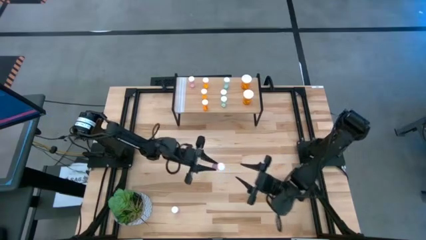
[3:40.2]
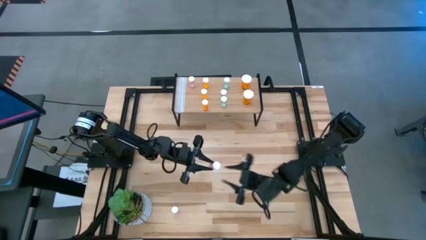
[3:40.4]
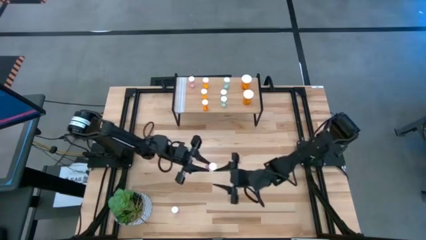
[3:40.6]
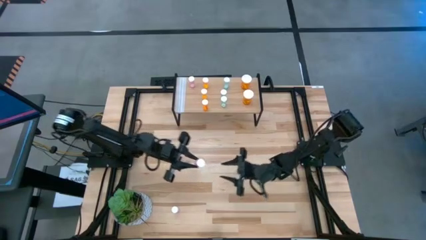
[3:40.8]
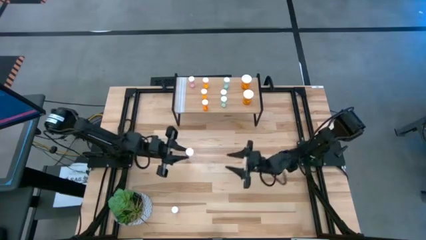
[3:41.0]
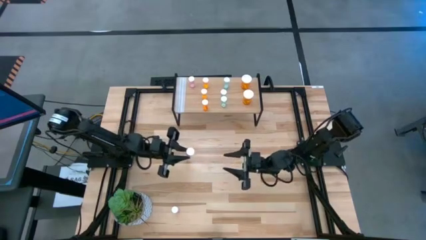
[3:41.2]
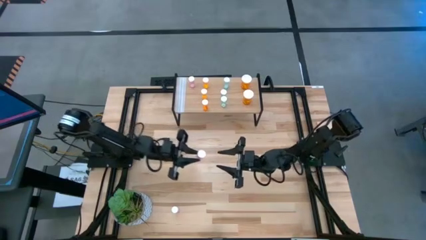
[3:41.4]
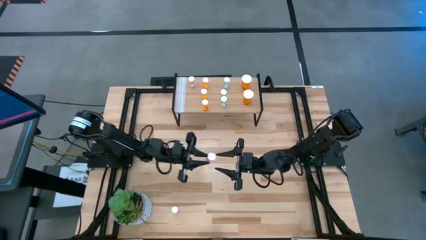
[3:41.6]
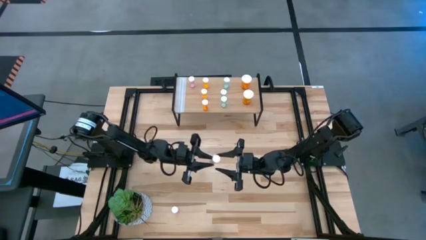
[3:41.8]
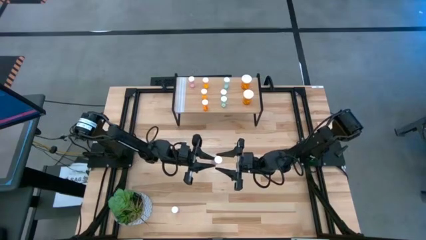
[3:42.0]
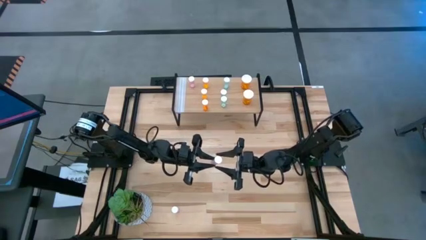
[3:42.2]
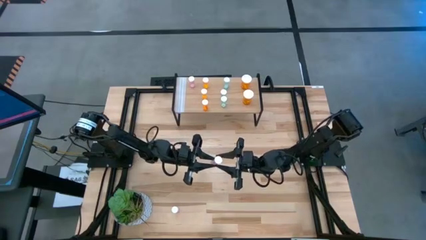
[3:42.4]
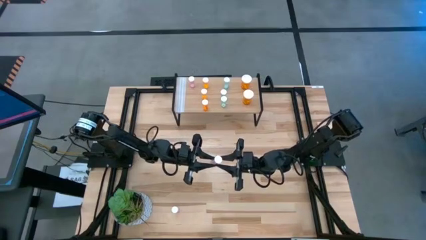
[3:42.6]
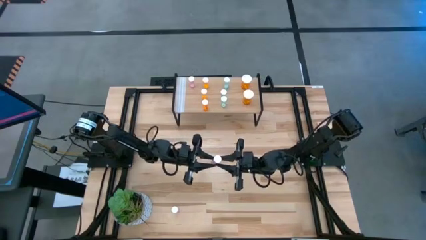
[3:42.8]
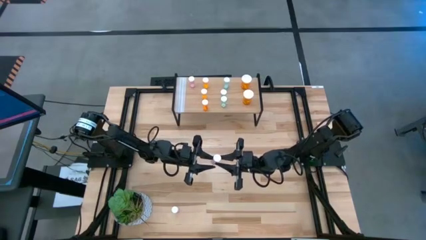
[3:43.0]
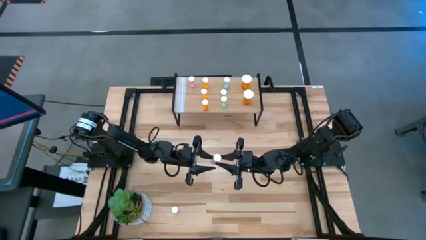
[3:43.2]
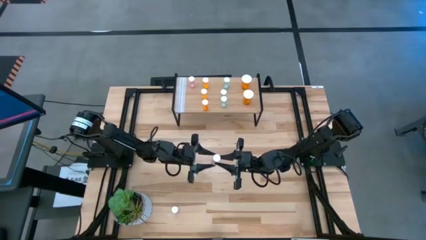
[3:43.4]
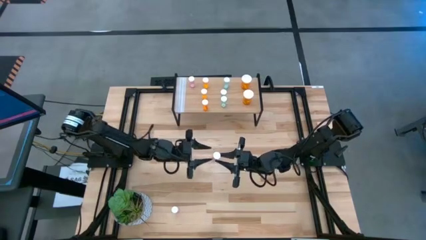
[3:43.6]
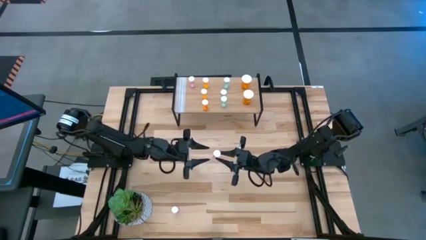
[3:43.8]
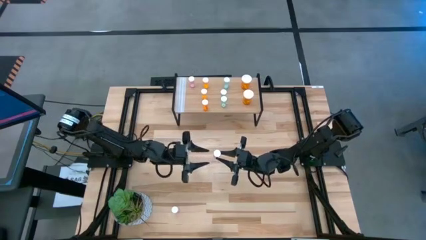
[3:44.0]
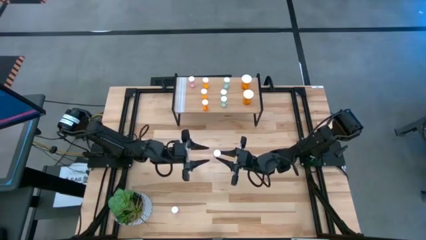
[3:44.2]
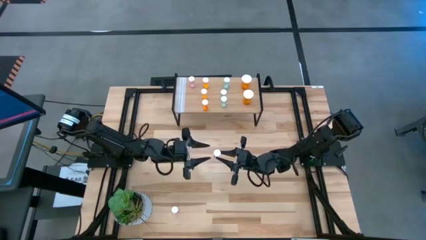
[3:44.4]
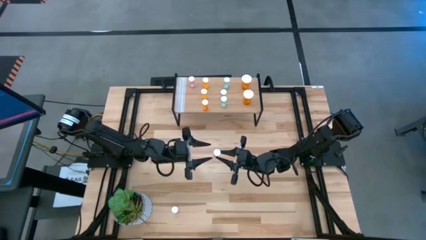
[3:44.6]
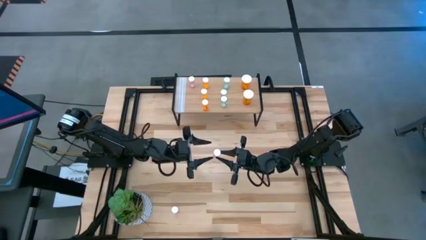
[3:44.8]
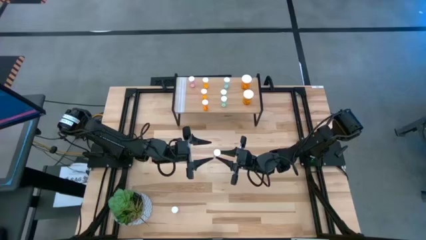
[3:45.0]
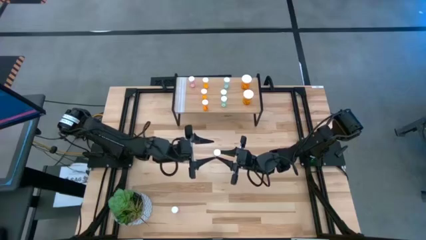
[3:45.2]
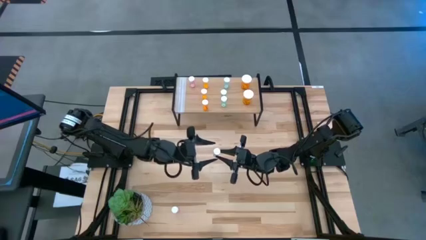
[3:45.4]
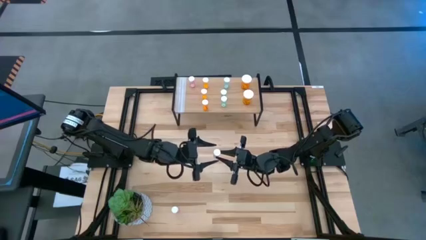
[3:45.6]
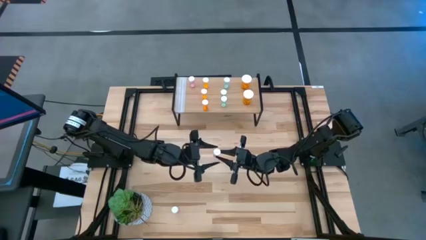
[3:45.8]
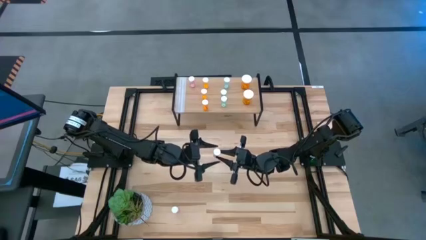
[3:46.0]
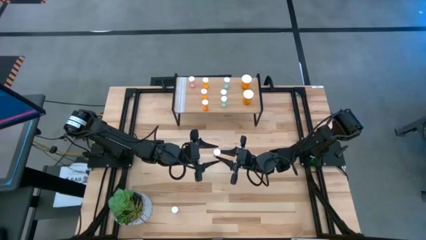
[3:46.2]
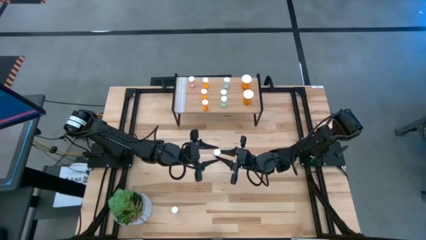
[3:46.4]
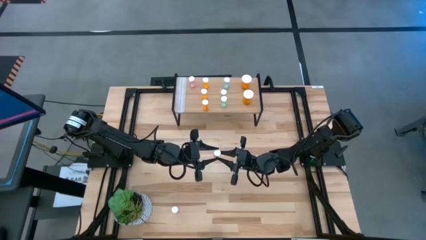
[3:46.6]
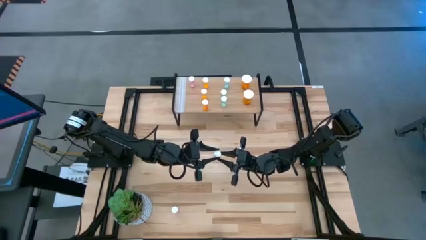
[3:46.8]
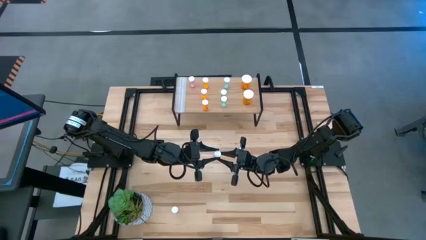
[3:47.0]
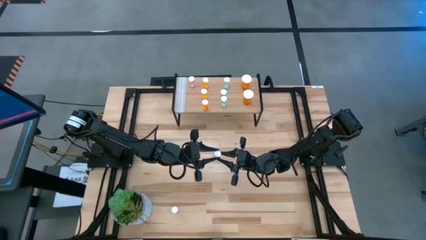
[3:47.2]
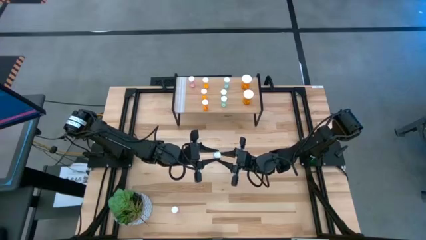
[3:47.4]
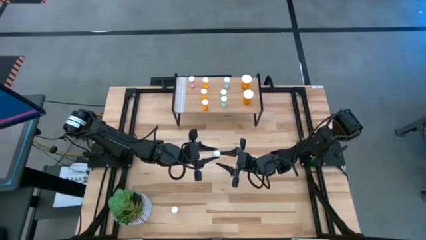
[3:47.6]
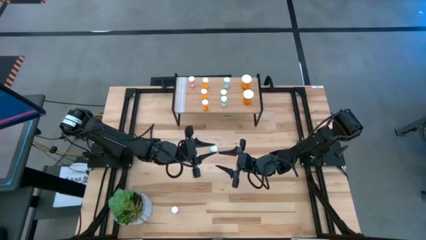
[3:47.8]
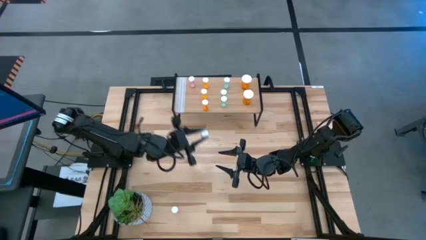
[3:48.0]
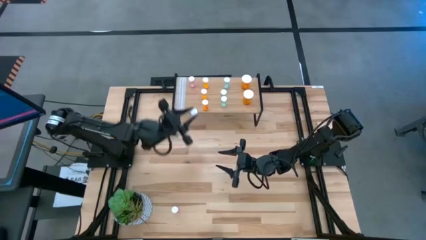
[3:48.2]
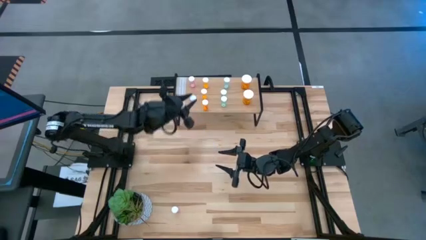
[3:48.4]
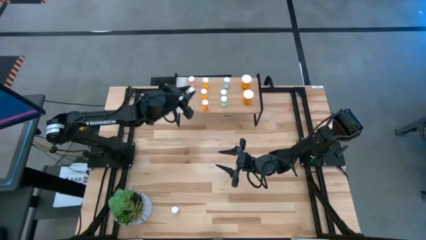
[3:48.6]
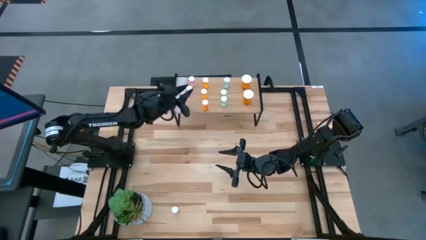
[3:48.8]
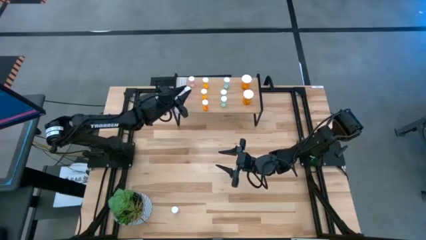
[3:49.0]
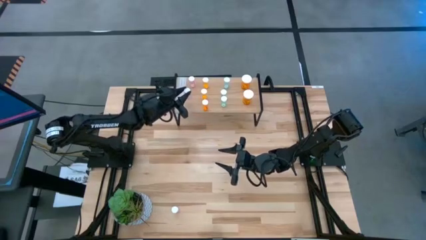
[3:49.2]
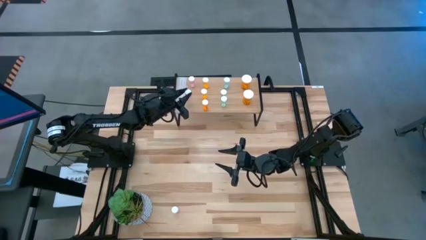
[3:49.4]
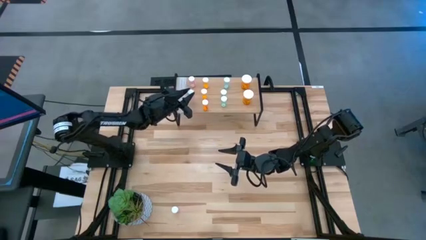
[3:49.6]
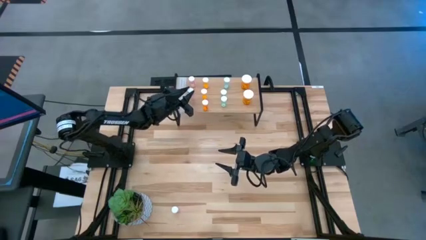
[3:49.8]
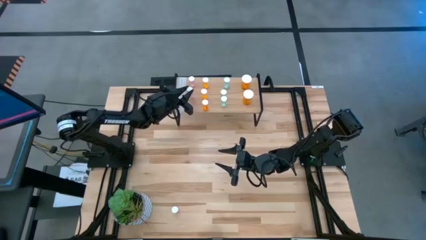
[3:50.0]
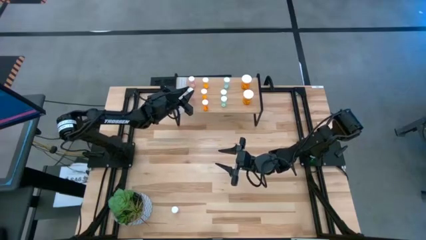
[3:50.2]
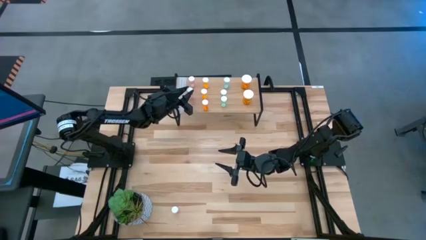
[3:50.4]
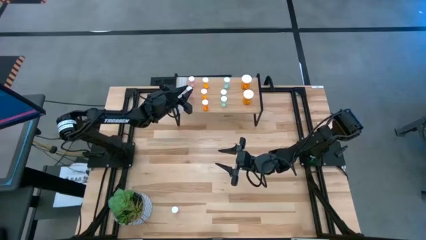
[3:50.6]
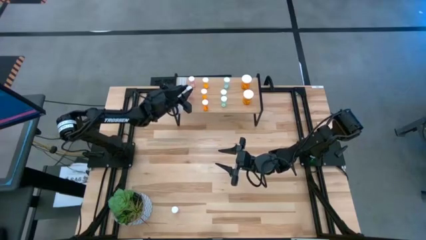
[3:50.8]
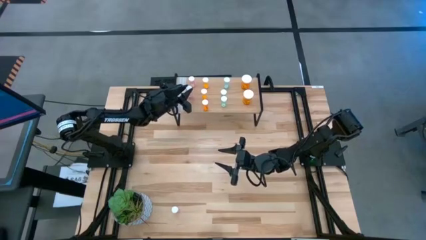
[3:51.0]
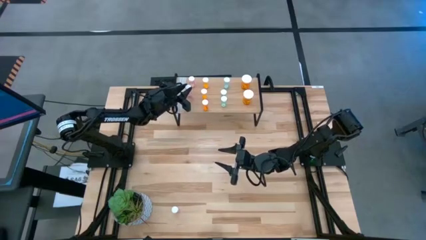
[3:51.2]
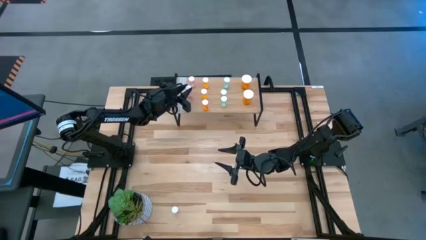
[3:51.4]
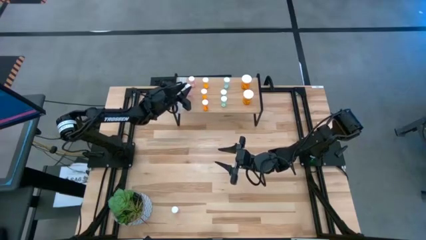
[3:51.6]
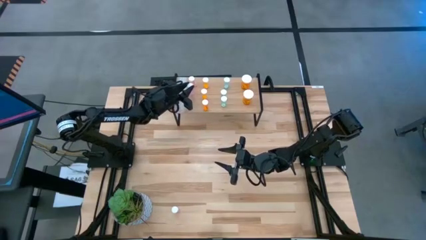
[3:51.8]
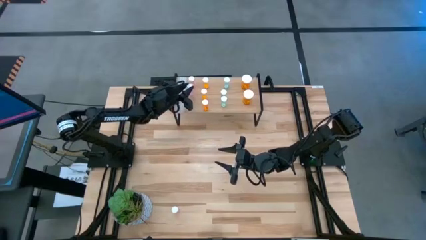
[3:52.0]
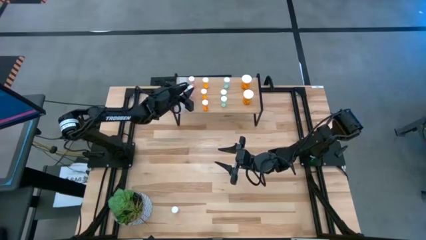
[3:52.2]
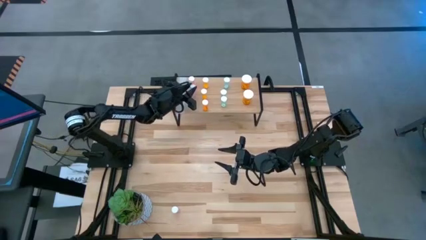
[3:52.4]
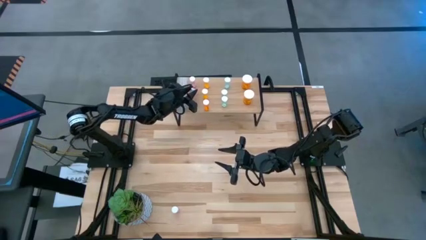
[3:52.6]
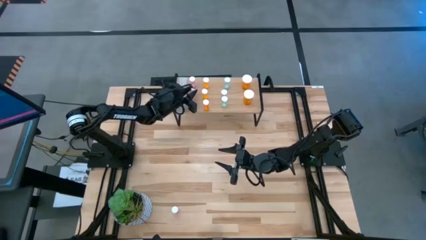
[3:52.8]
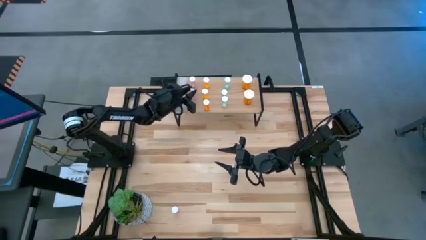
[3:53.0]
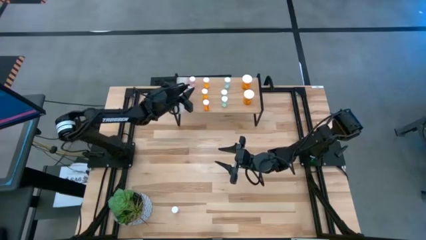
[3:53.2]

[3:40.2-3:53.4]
Task: Pick and place medicine bottles onto shelf by color
Put the top small pink pill bottle on the shelf aligned with the other small pink pill bottle

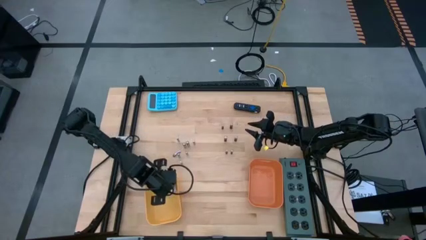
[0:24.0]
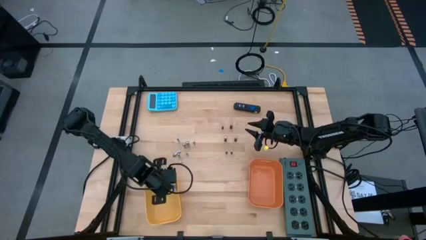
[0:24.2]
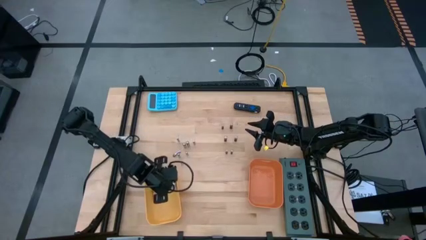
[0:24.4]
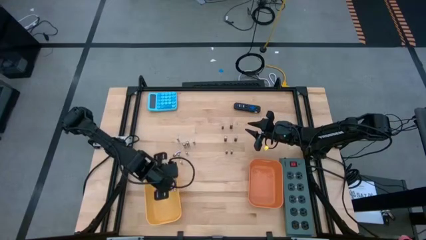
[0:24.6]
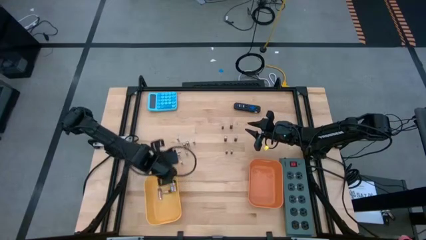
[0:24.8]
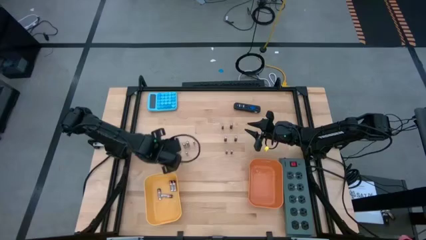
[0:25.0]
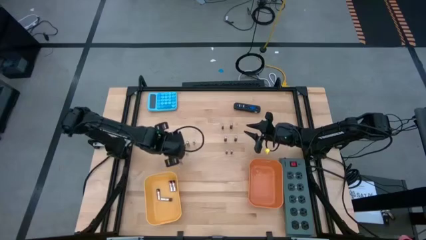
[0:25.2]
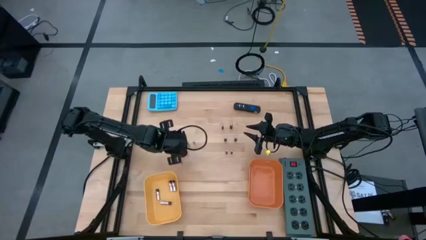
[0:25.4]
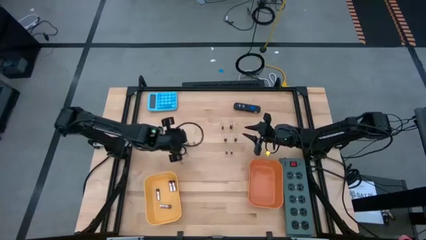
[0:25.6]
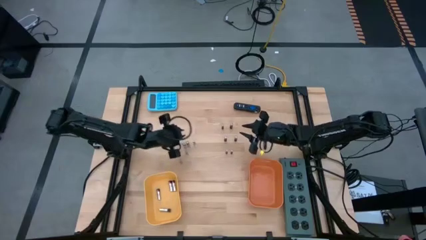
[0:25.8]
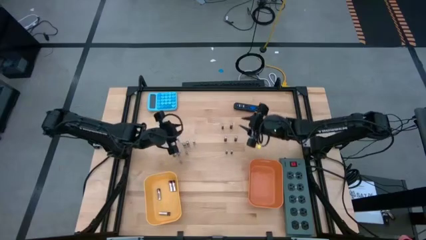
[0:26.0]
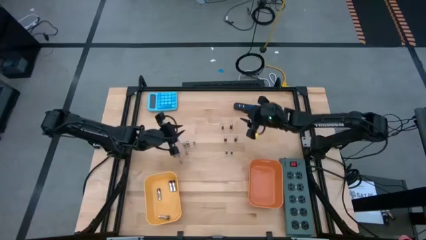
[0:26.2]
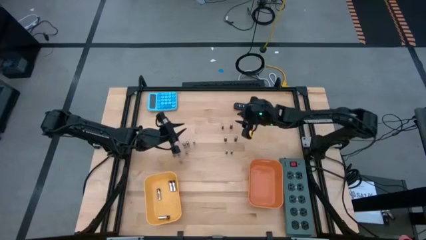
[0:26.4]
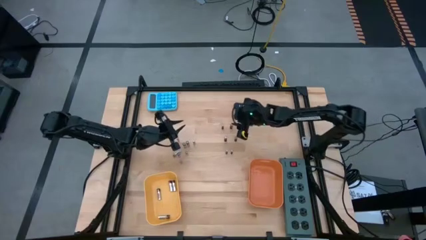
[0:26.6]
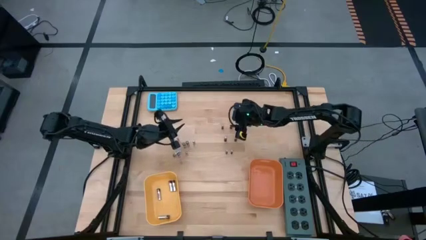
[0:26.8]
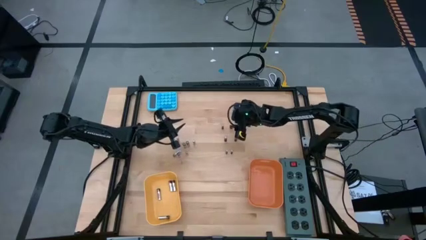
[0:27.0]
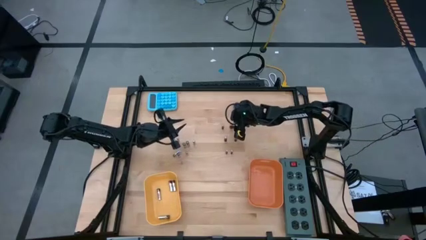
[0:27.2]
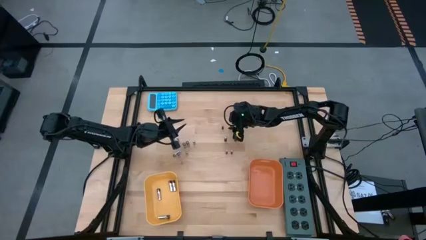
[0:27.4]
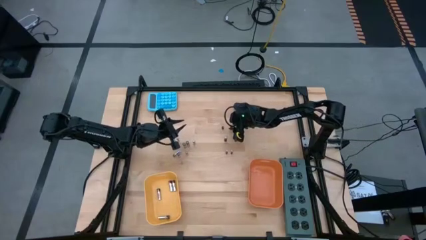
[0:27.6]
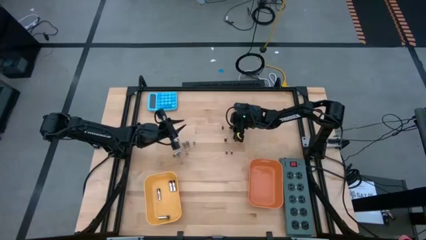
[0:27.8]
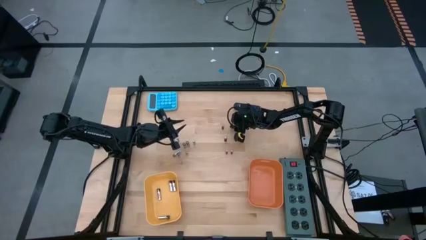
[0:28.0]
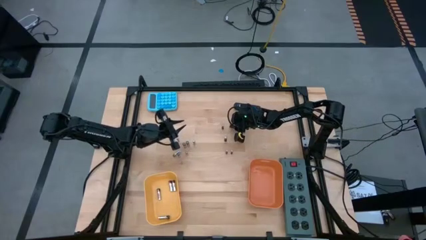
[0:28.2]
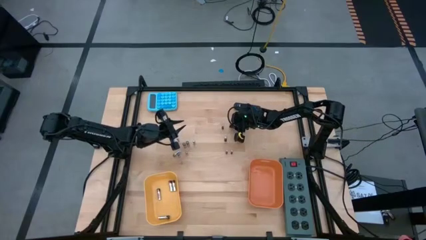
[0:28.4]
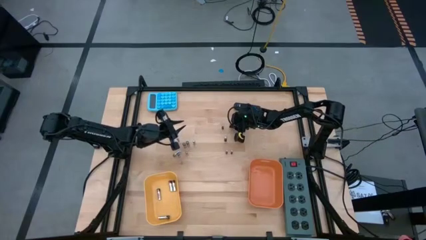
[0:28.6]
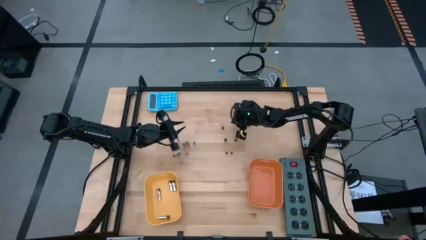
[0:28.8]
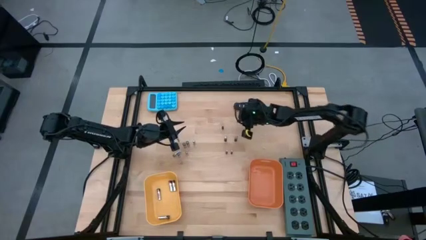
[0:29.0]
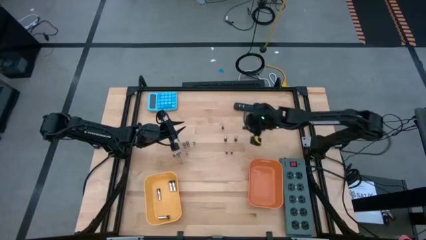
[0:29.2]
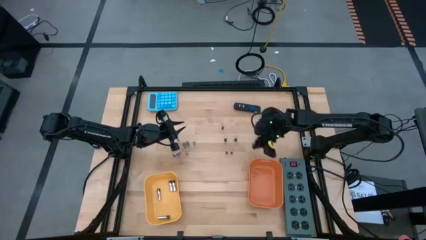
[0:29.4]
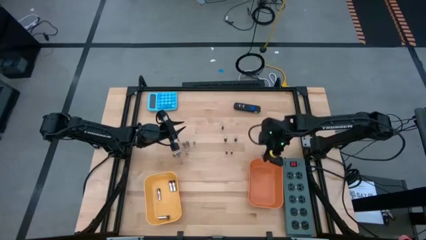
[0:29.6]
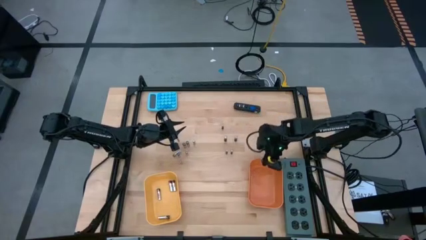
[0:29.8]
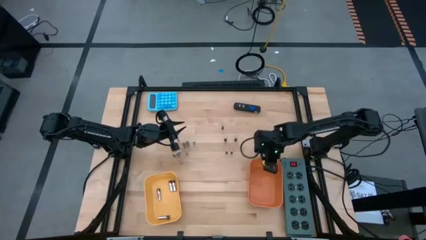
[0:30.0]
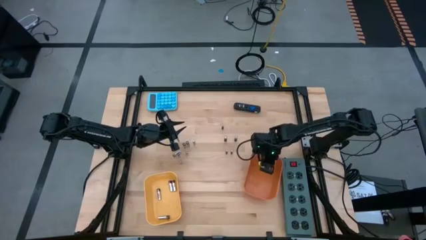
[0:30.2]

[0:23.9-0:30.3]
Task: Sort batteries
Put the brown battery into the orange bin
